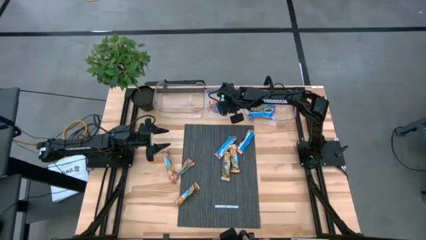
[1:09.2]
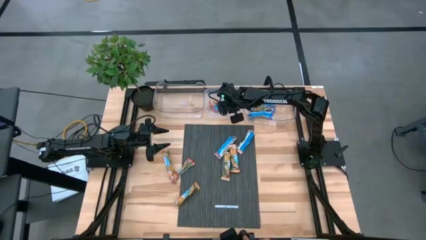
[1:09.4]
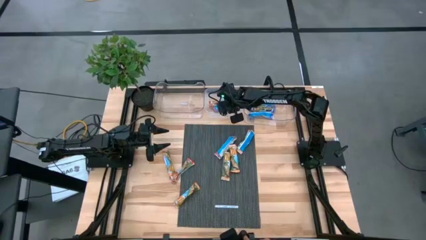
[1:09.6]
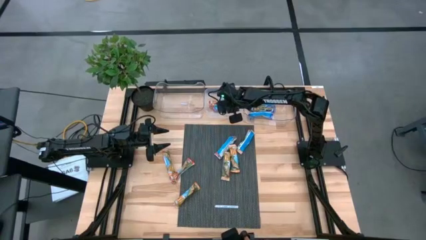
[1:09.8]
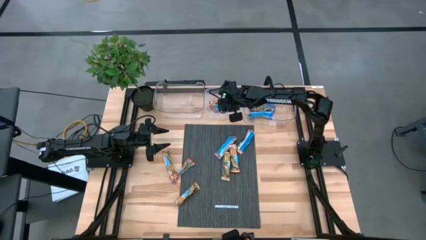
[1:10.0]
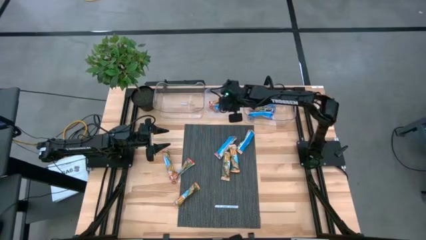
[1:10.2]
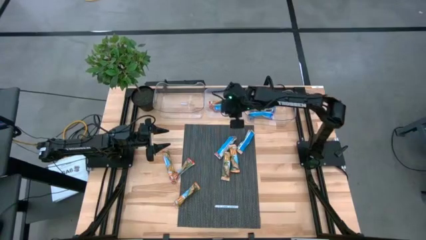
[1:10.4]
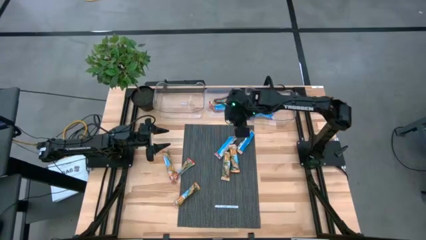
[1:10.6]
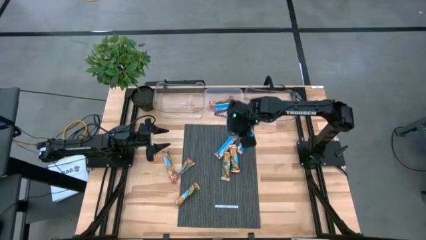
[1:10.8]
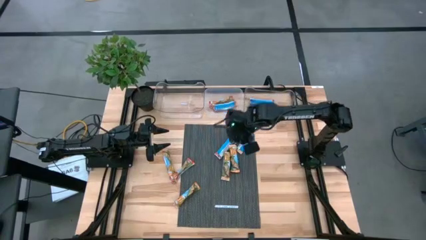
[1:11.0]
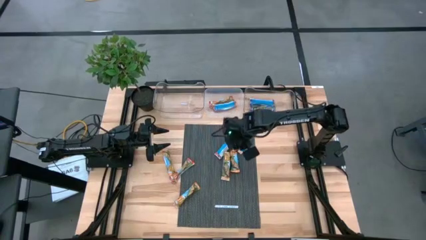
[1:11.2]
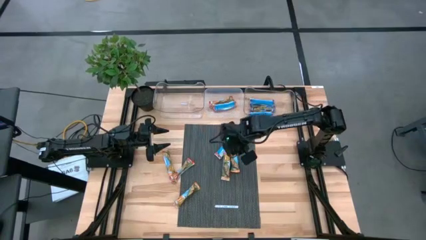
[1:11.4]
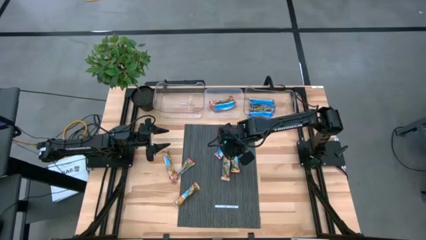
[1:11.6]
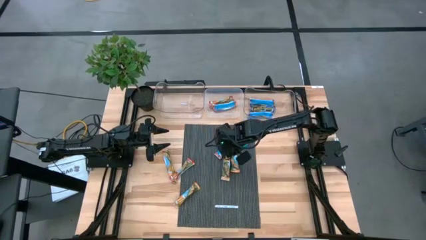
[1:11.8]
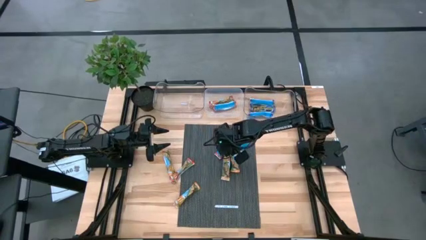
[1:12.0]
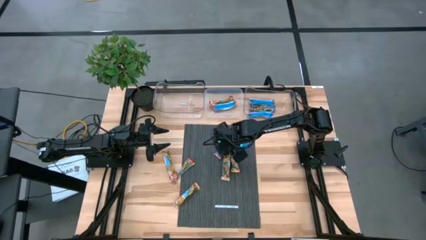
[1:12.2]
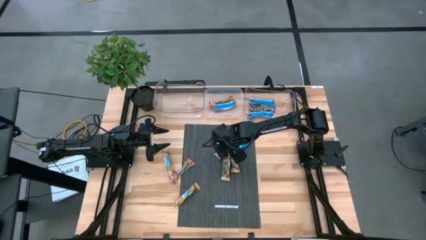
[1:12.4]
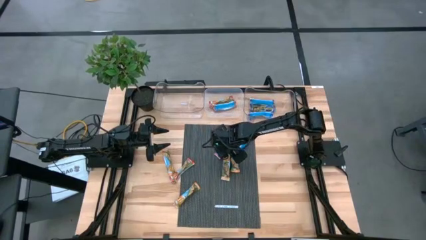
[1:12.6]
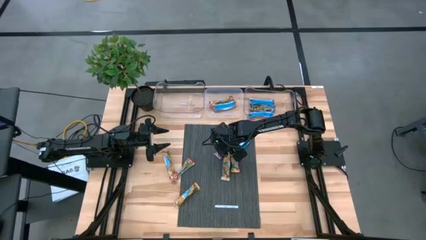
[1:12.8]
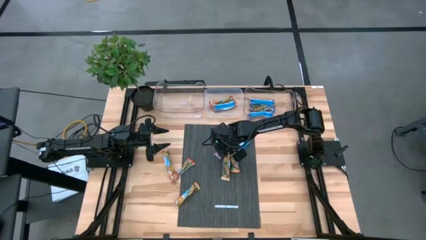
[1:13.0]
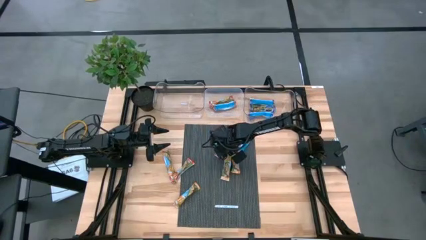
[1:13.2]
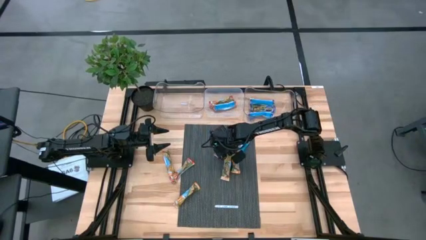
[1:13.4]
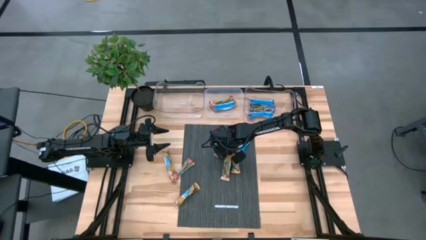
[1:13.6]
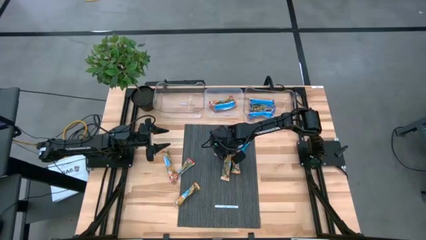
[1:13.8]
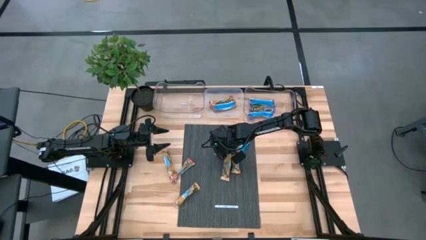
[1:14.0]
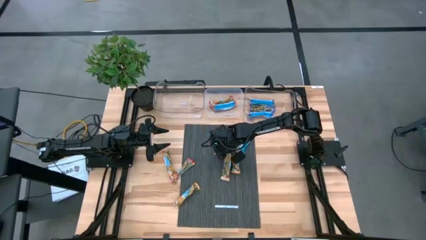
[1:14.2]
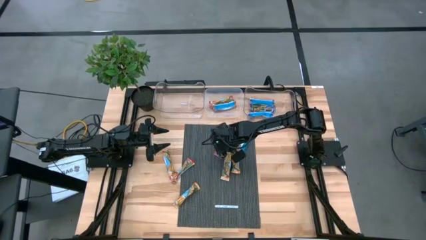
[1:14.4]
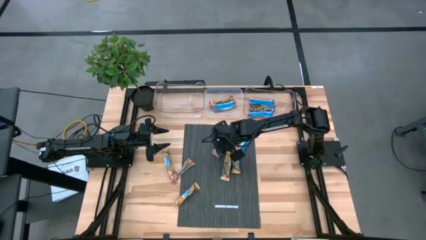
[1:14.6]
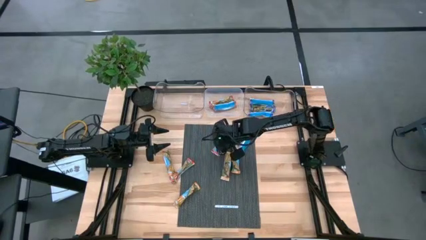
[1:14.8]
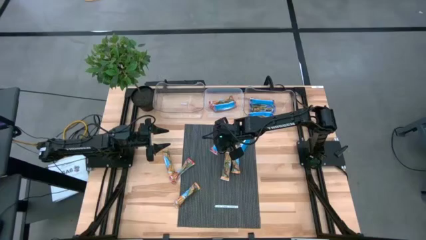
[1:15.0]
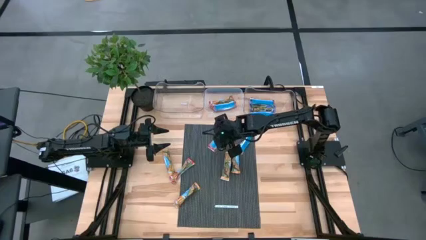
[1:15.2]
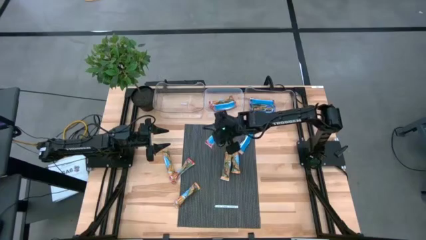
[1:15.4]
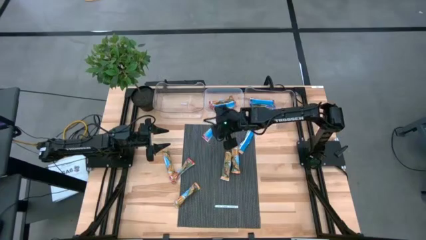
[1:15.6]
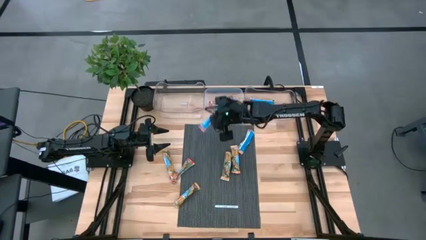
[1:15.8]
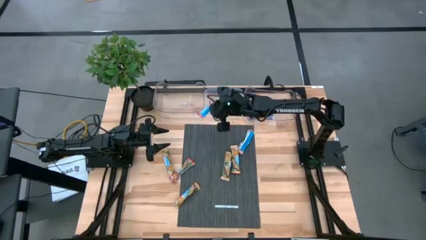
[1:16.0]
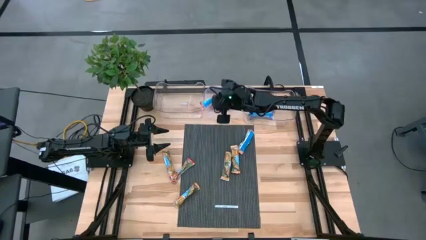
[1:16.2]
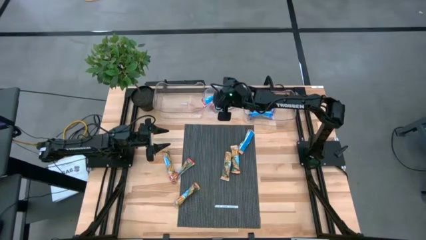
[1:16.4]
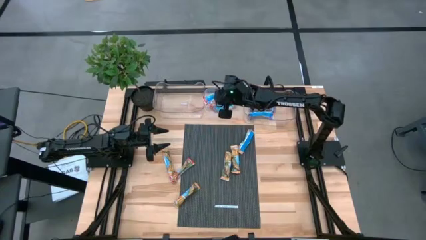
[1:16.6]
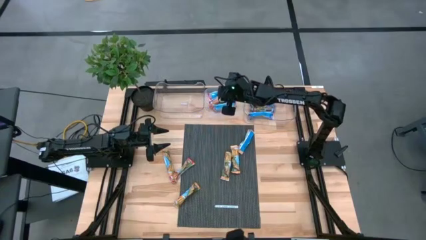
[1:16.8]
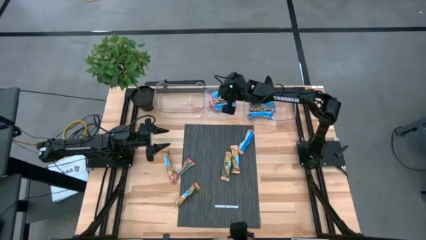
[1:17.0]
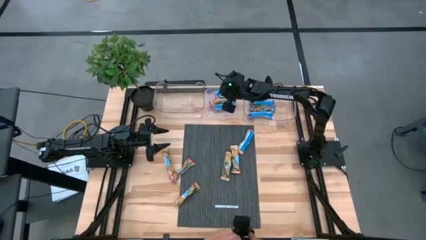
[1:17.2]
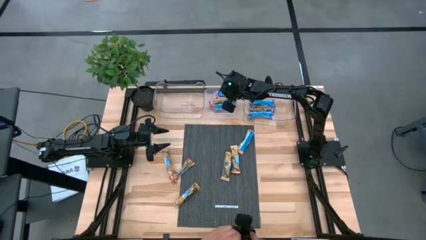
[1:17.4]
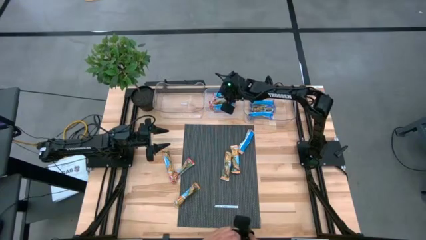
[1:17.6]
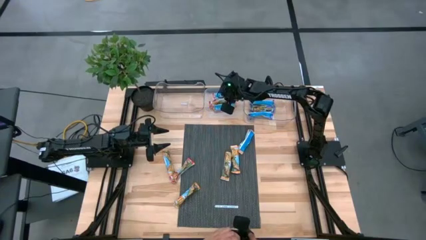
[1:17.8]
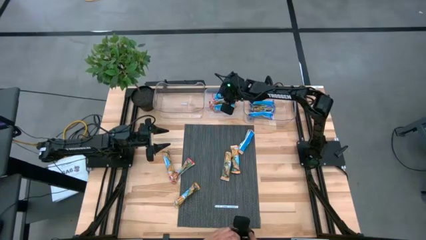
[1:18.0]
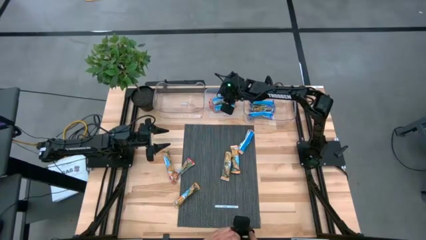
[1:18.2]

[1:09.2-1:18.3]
Task: Pick and place Granola Bars by type
Put the top red granola bar into the white bin

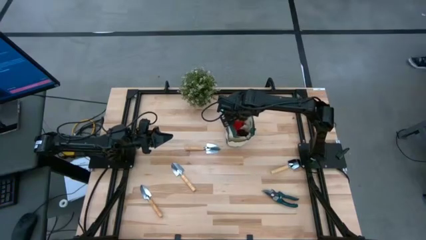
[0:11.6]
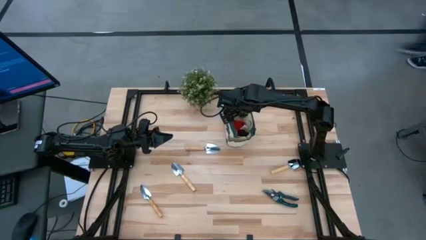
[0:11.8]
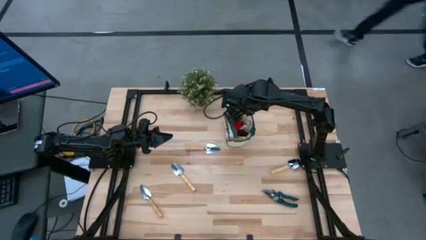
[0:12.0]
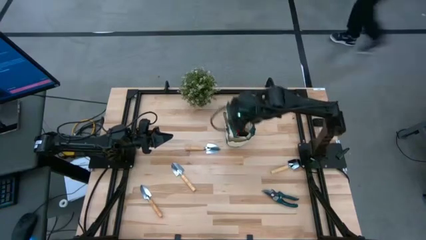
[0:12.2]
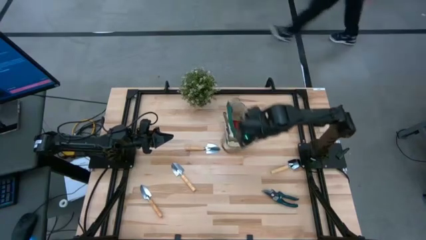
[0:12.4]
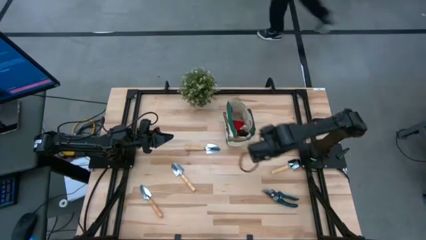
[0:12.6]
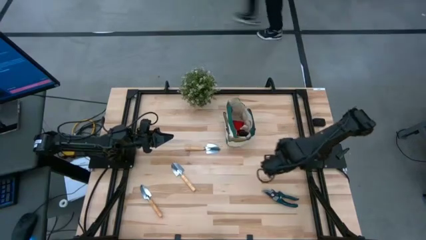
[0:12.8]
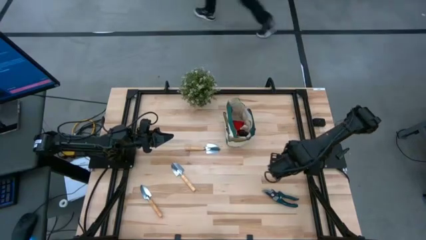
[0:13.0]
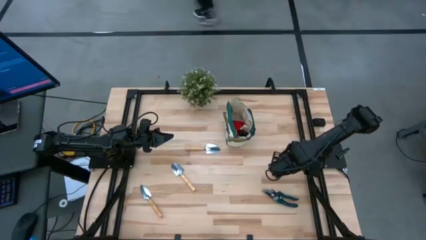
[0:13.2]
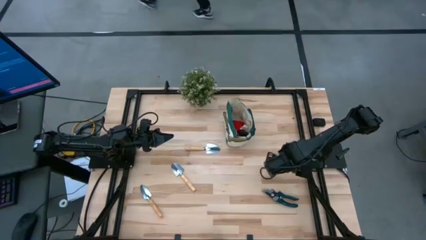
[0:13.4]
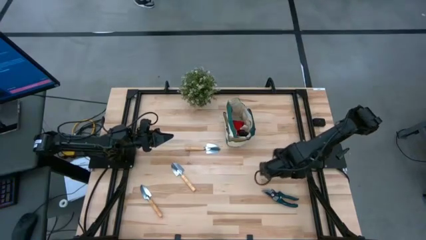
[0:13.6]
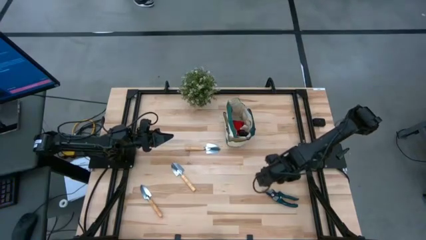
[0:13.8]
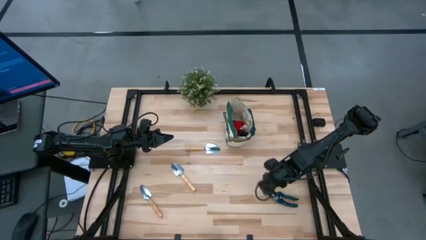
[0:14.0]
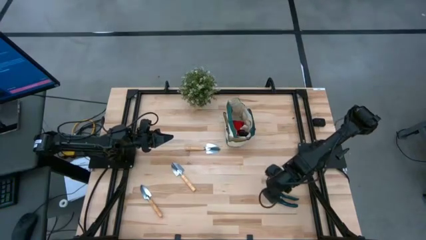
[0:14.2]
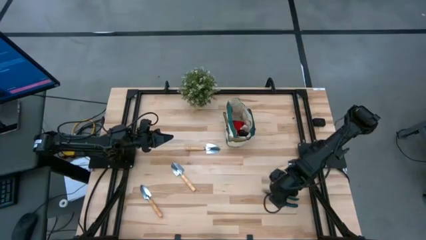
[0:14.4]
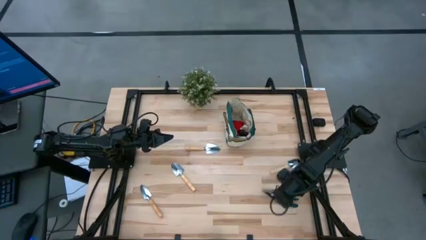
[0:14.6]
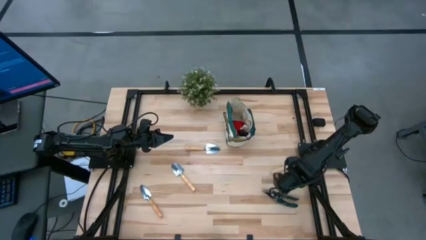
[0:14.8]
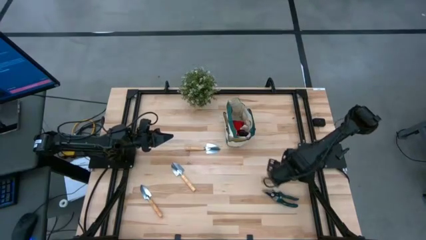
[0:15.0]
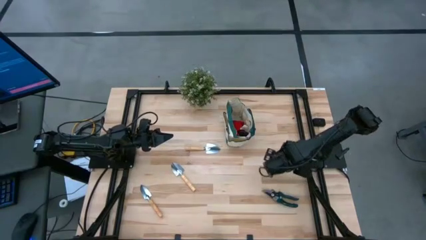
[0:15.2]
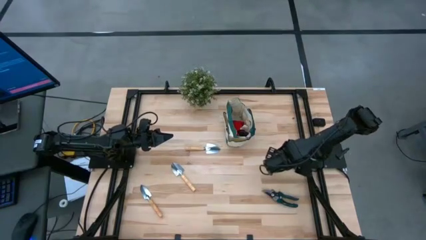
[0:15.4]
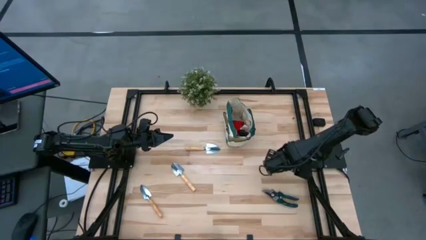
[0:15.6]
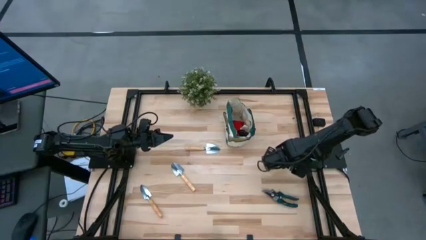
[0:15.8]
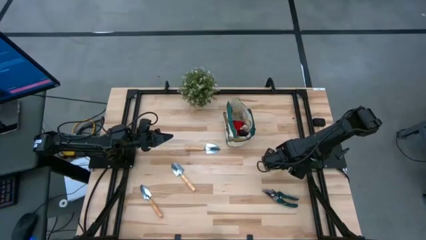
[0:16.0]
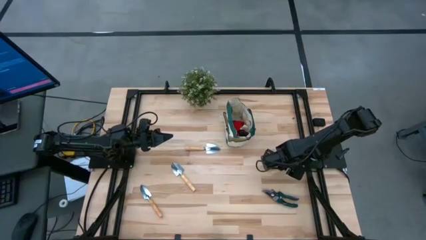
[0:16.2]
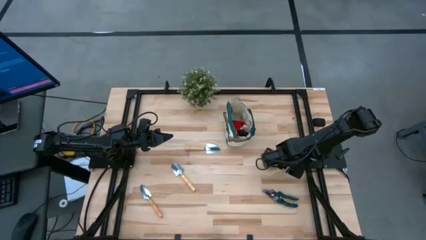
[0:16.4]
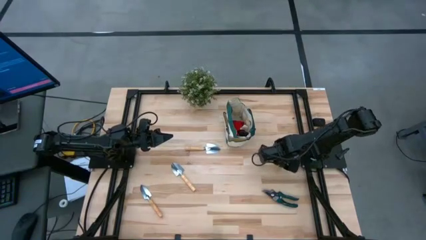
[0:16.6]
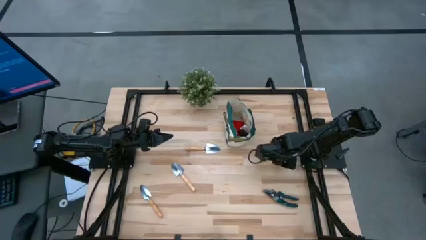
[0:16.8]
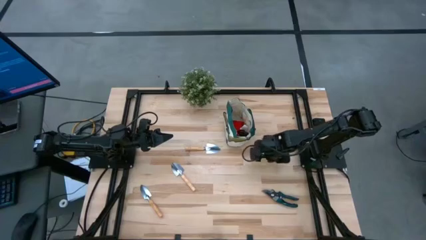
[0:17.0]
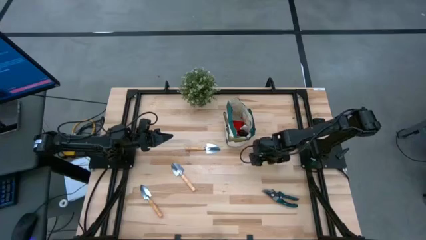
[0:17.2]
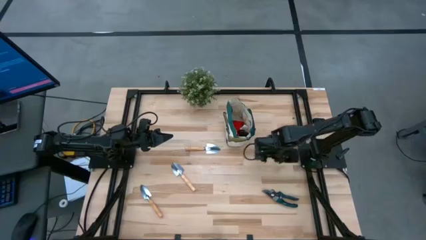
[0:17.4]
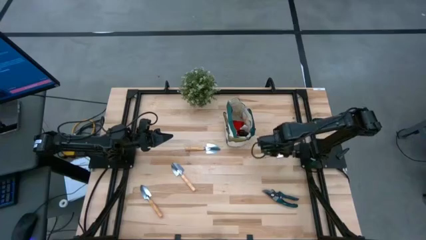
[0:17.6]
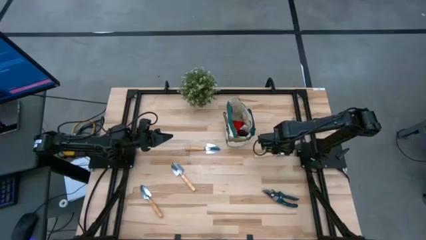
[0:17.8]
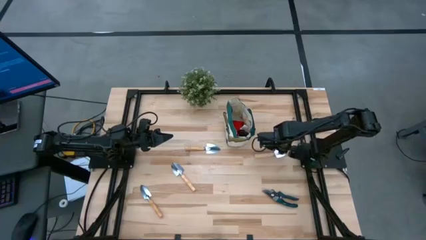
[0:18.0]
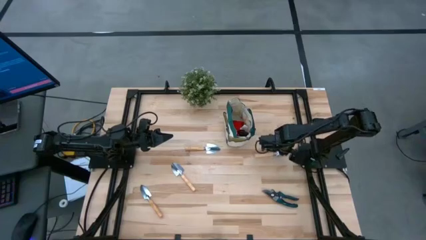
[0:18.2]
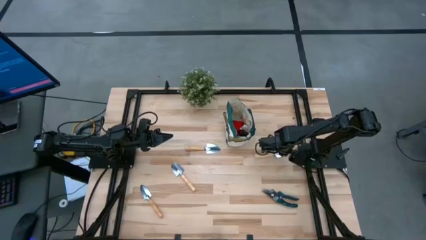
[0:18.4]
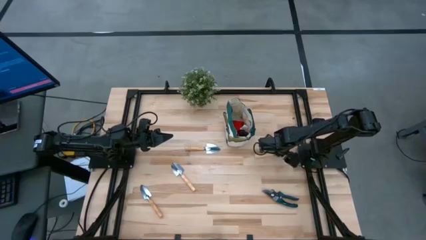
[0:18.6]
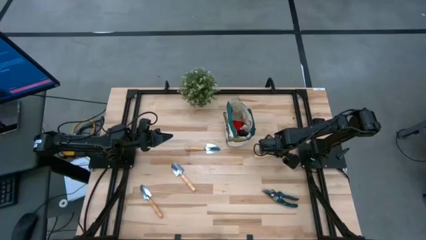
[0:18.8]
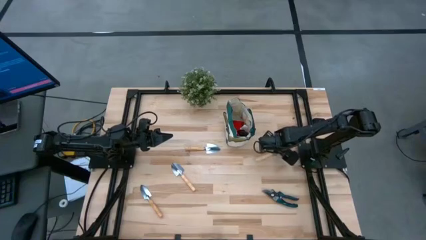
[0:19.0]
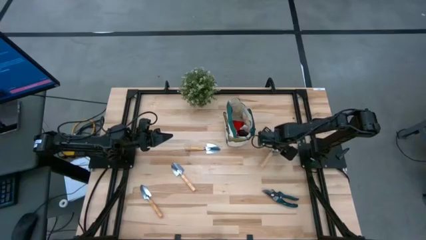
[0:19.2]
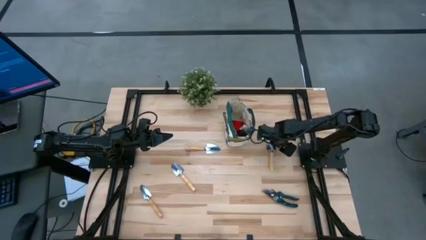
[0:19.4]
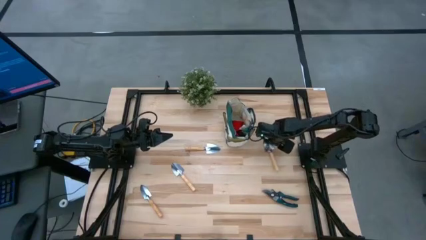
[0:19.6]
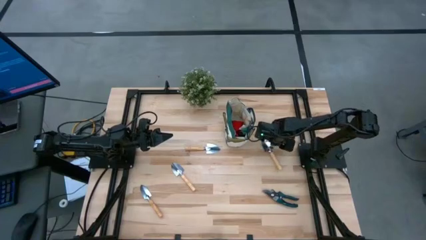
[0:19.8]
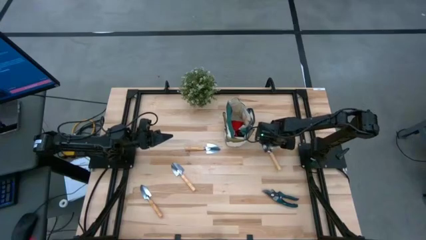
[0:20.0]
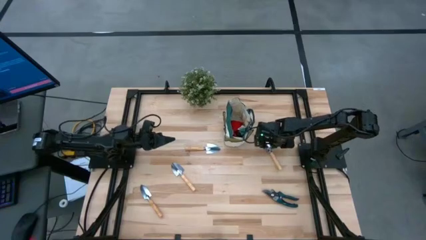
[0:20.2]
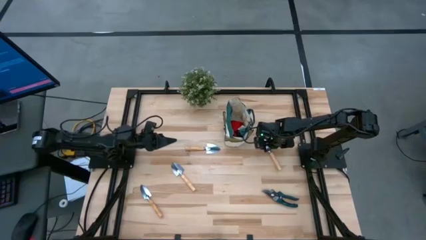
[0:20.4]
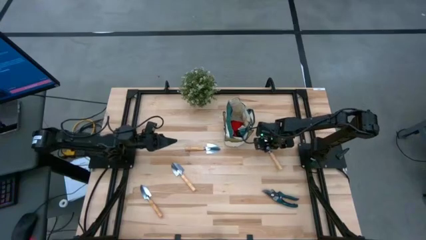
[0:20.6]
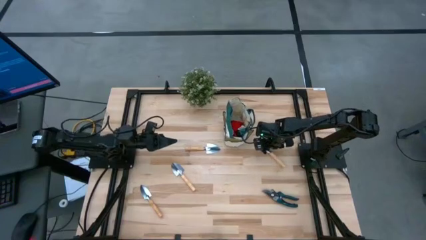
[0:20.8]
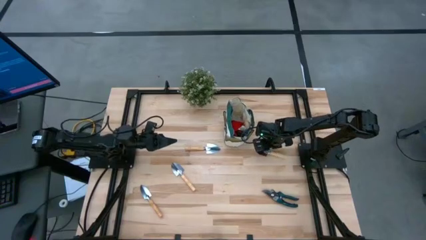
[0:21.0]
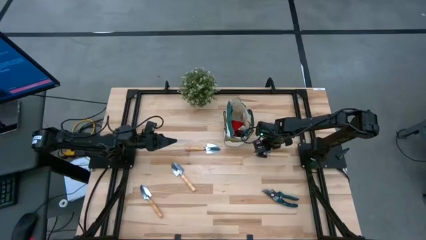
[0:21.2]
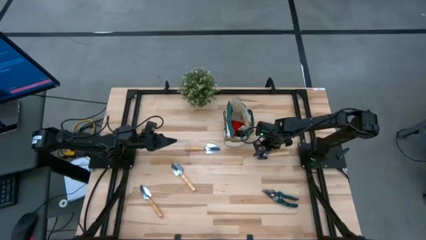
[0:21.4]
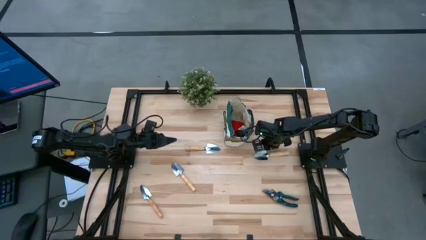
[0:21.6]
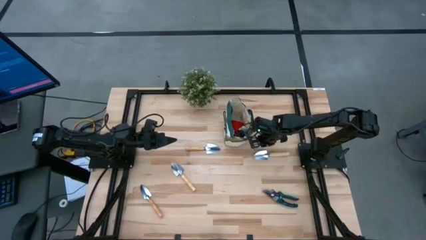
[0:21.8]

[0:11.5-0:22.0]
Task: Pick & Place Garden tools in Gardening bag
Put the brown trowel into the white gardening bag
